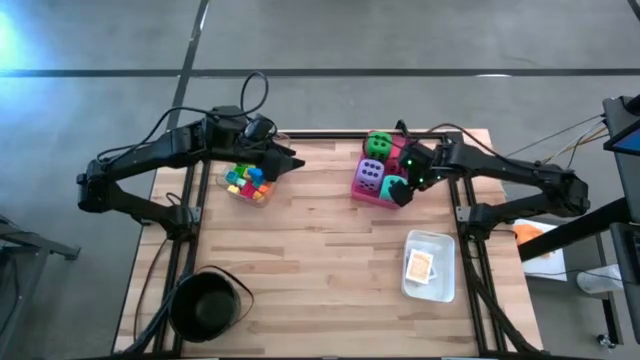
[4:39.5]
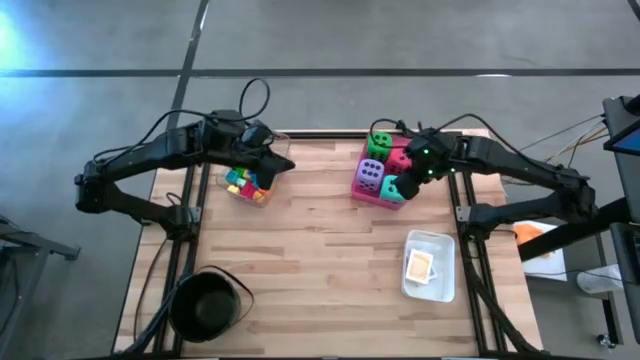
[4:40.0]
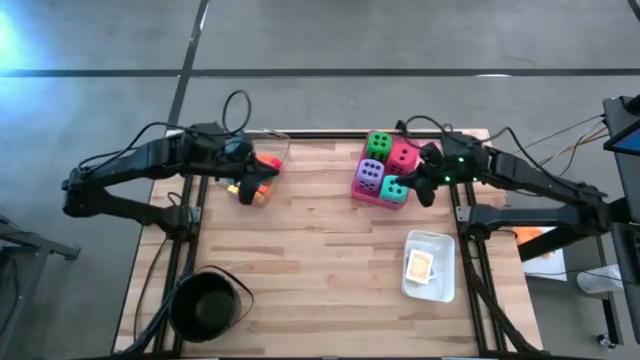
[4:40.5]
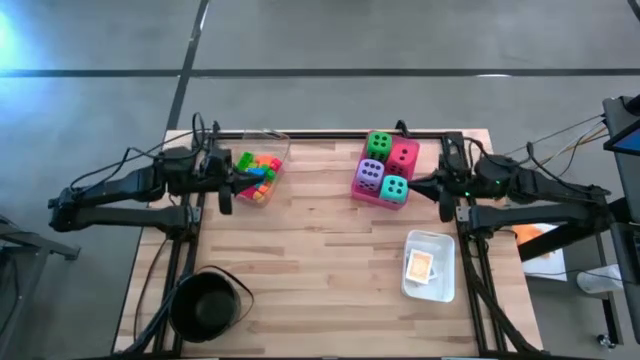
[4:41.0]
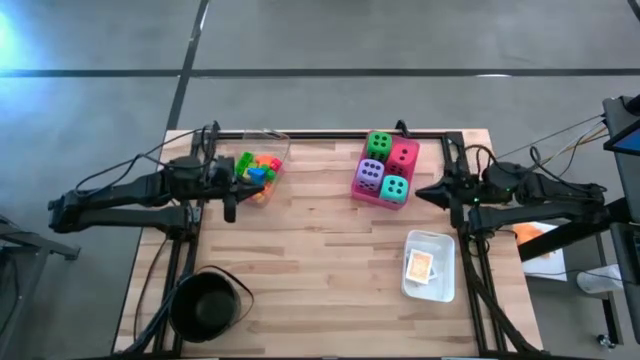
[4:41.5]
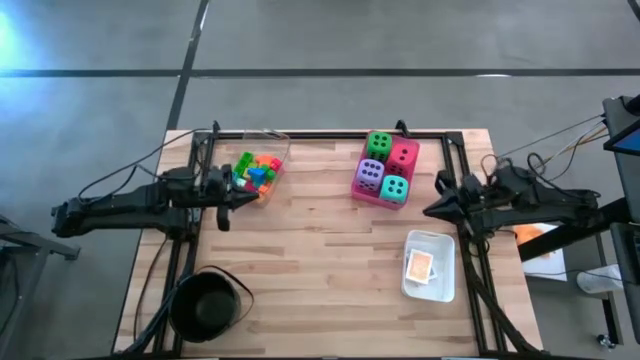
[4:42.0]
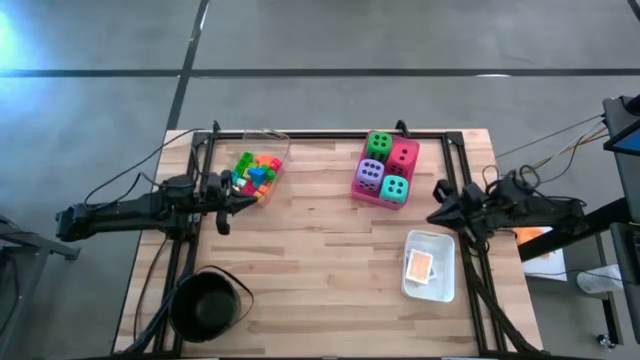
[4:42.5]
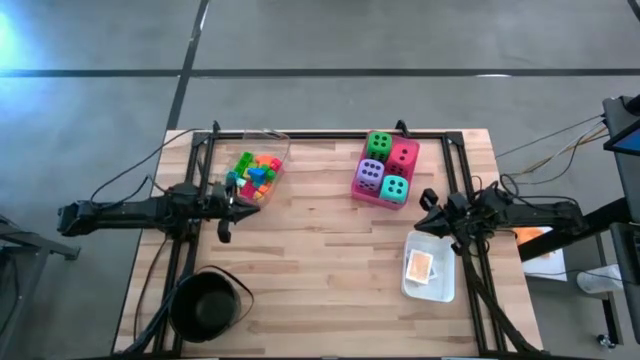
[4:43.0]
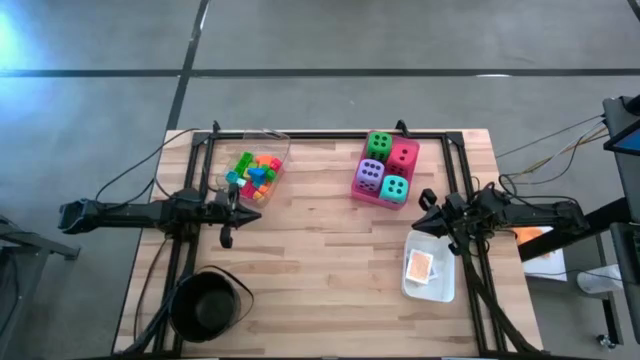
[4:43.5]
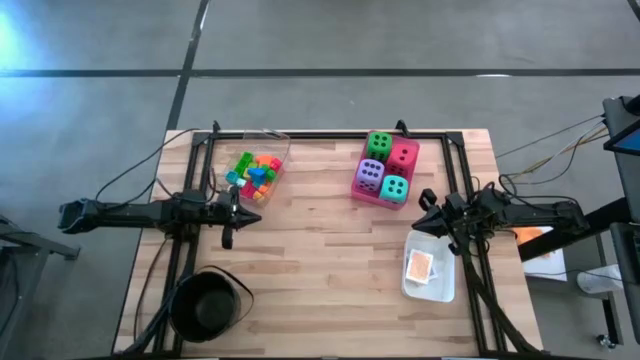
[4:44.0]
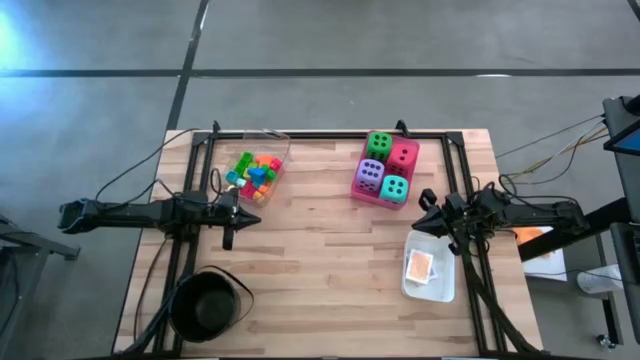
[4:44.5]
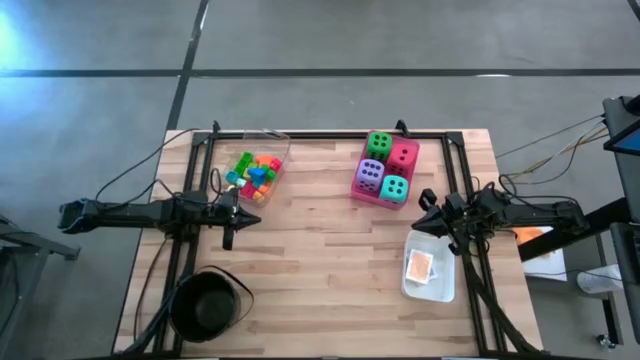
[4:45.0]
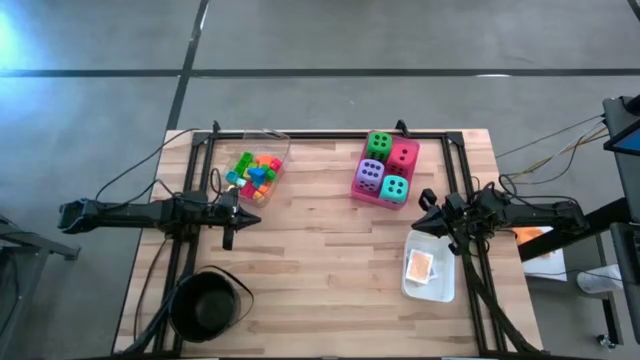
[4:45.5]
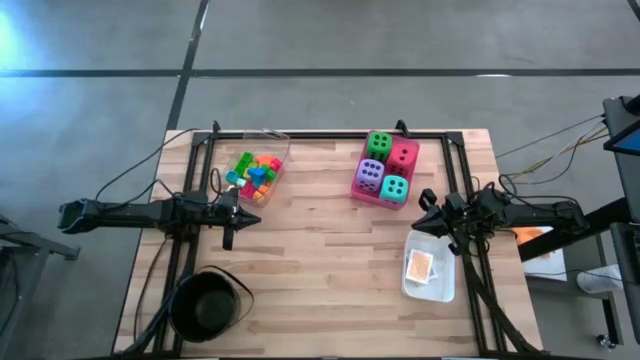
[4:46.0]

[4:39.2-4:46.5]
Task: Pick & Place Toys
Return to Home Position

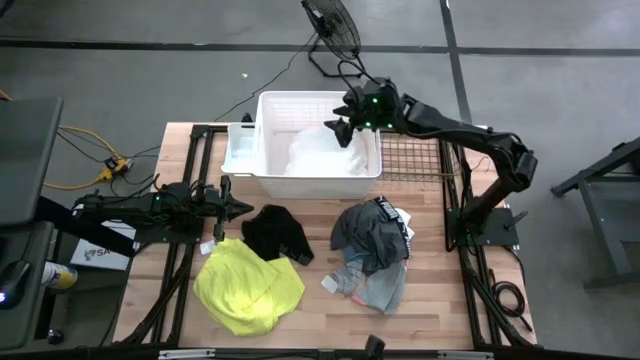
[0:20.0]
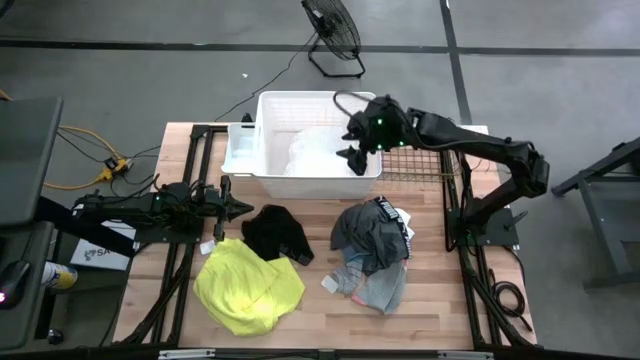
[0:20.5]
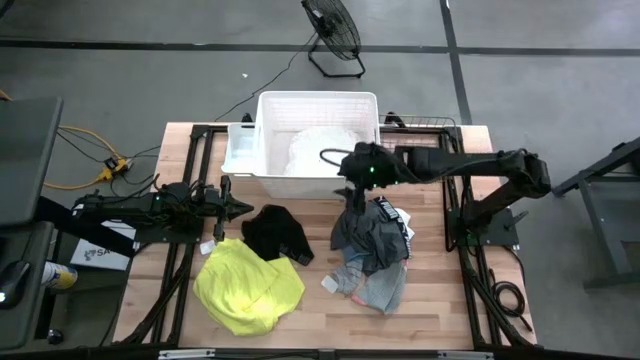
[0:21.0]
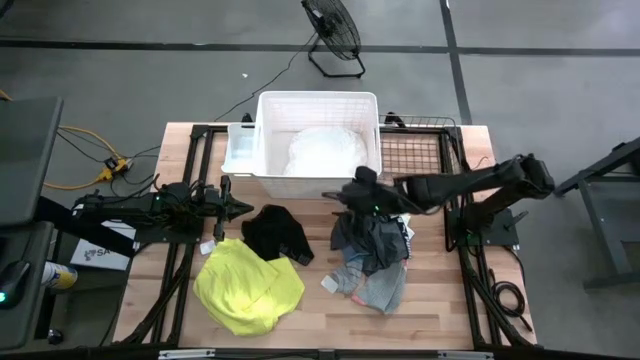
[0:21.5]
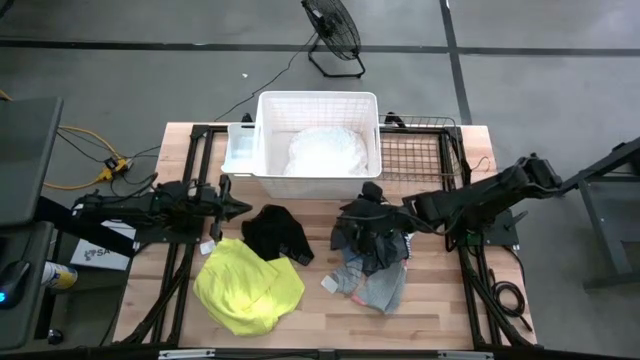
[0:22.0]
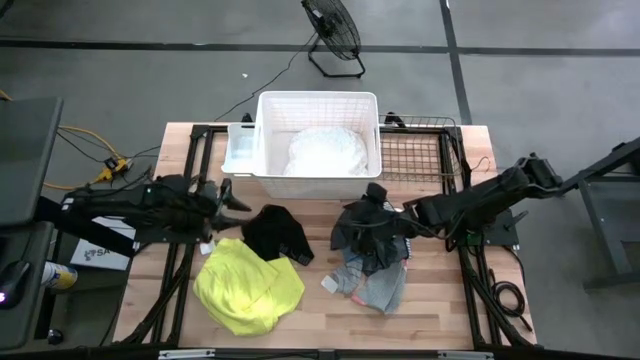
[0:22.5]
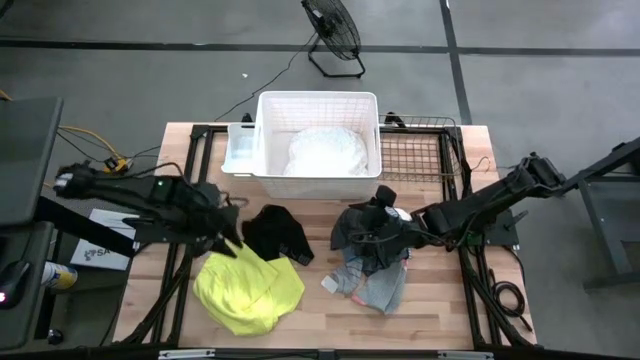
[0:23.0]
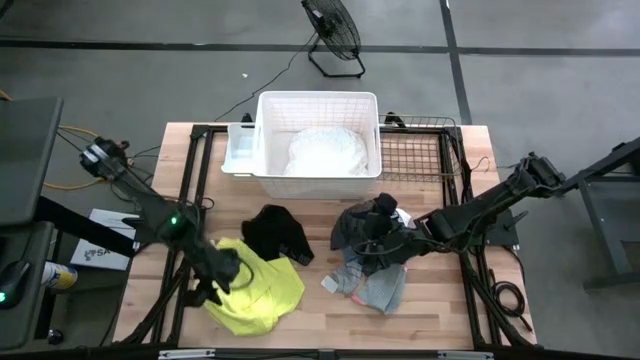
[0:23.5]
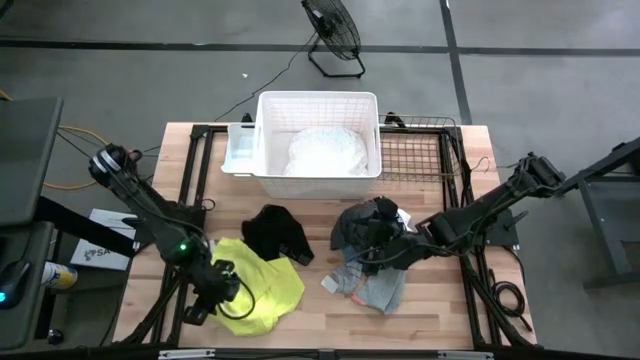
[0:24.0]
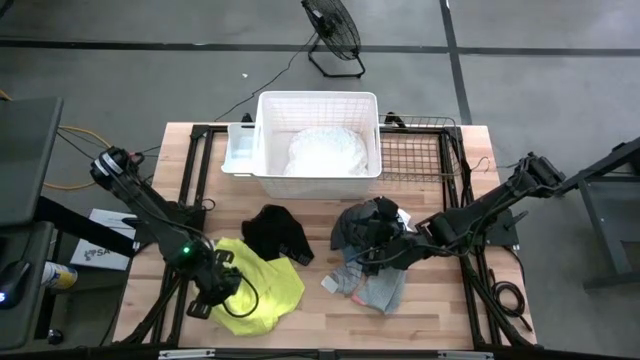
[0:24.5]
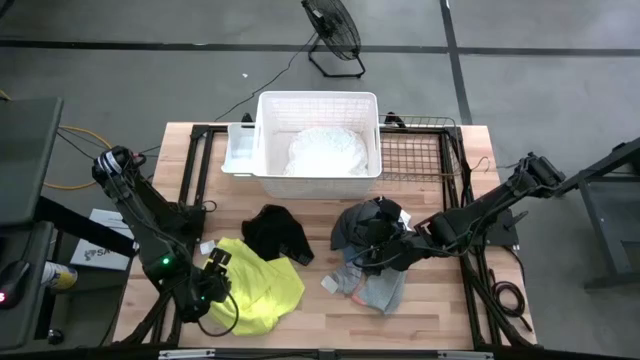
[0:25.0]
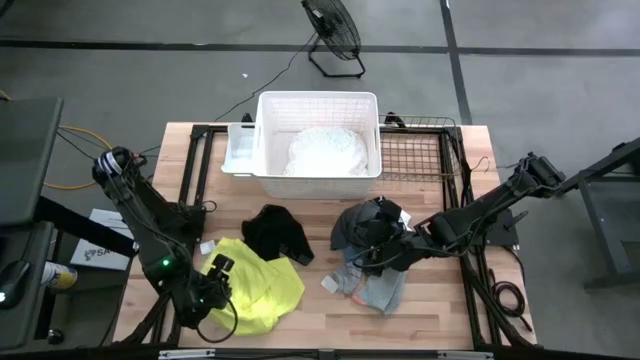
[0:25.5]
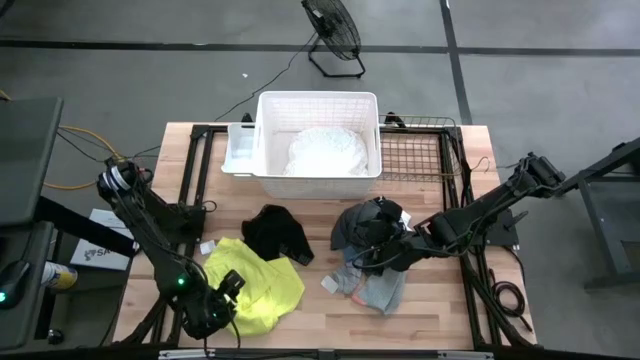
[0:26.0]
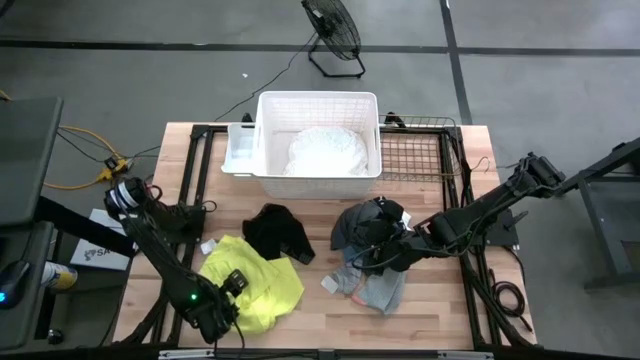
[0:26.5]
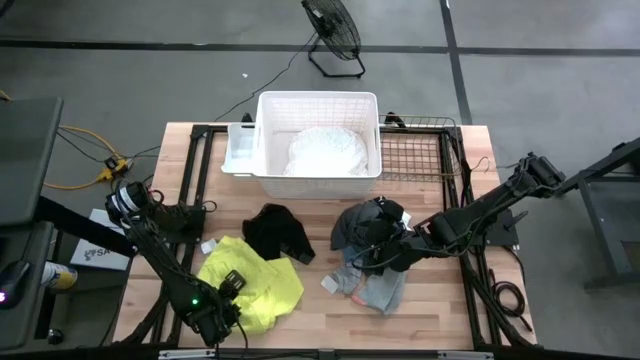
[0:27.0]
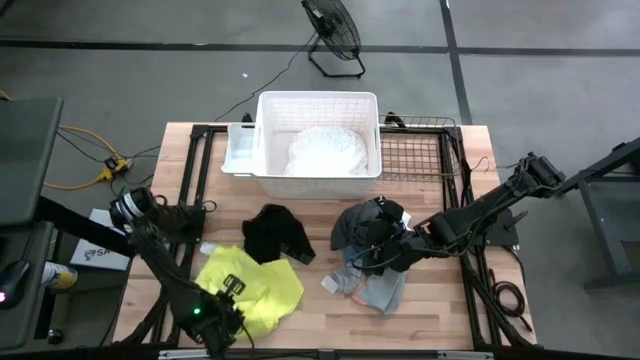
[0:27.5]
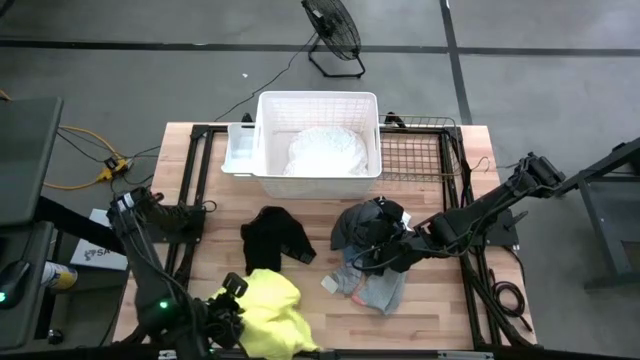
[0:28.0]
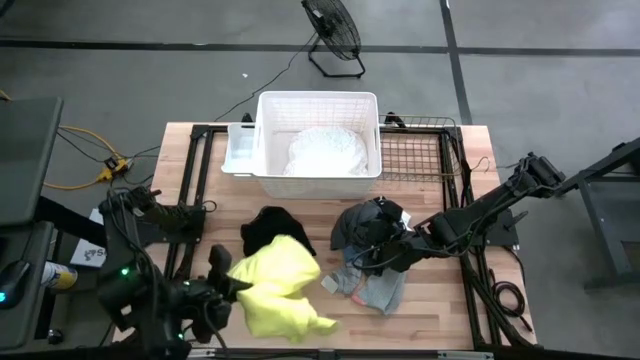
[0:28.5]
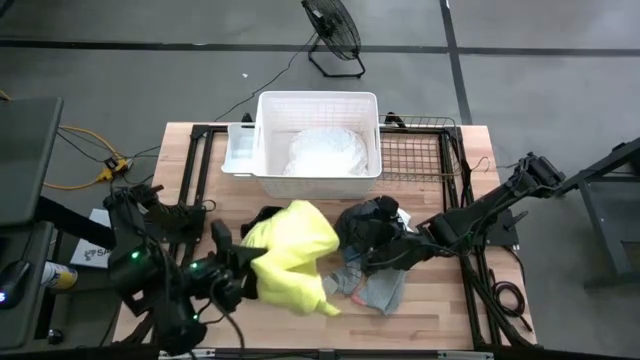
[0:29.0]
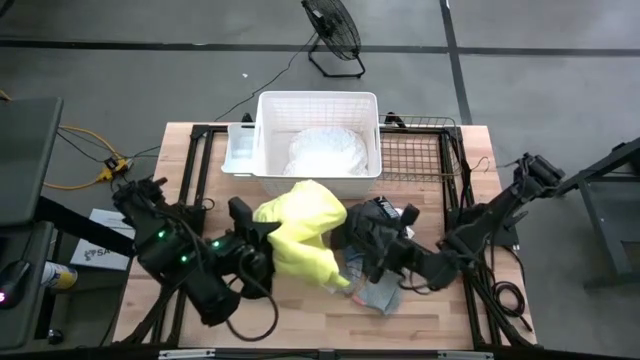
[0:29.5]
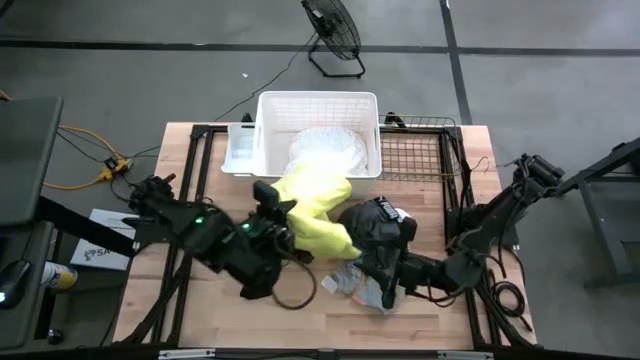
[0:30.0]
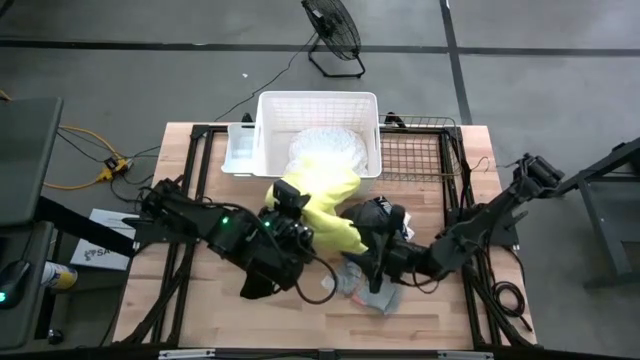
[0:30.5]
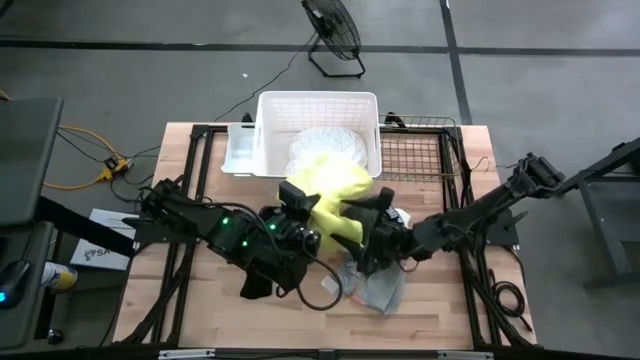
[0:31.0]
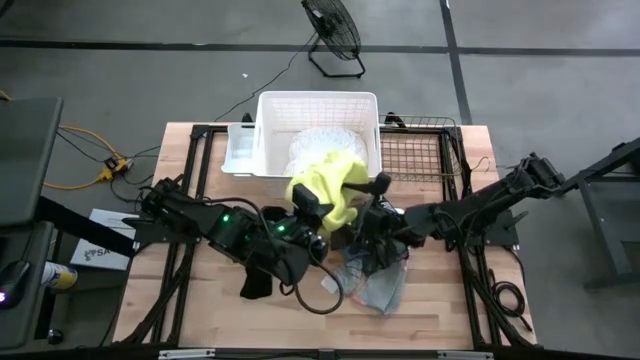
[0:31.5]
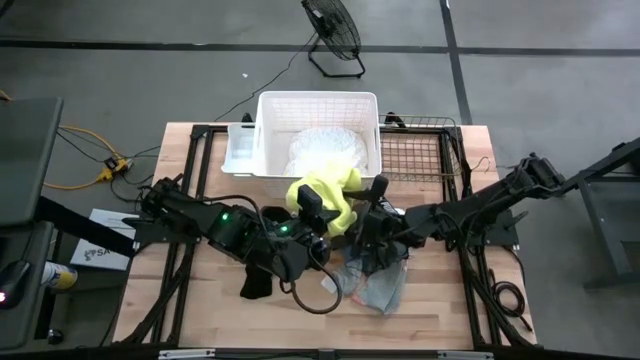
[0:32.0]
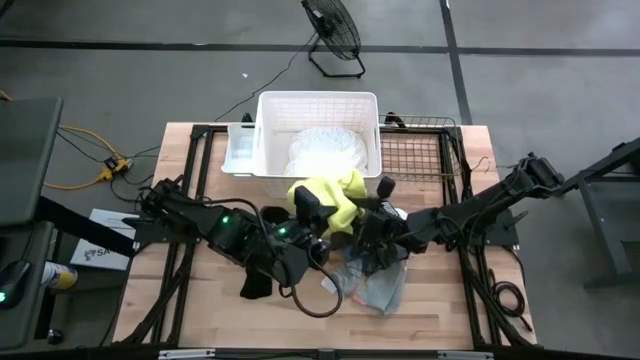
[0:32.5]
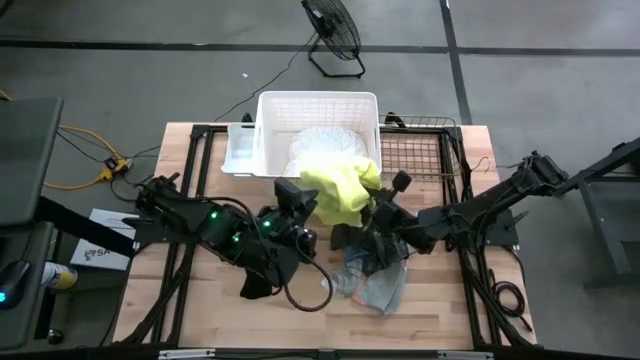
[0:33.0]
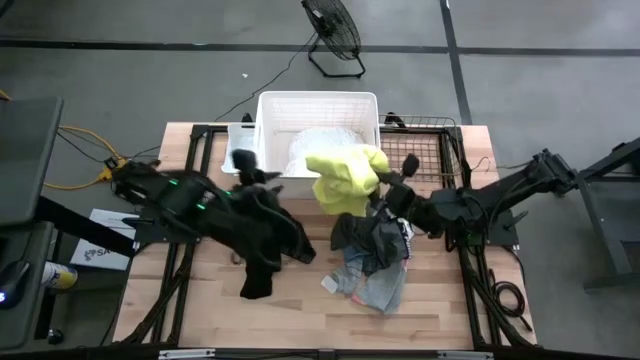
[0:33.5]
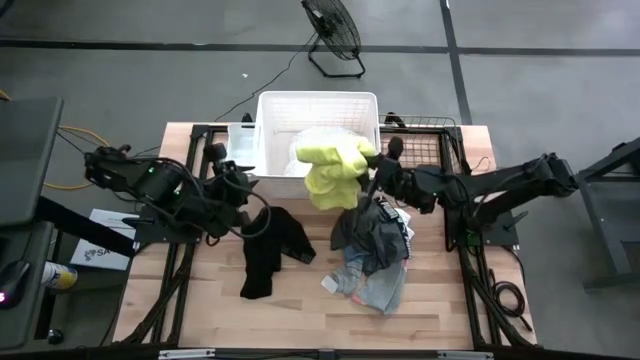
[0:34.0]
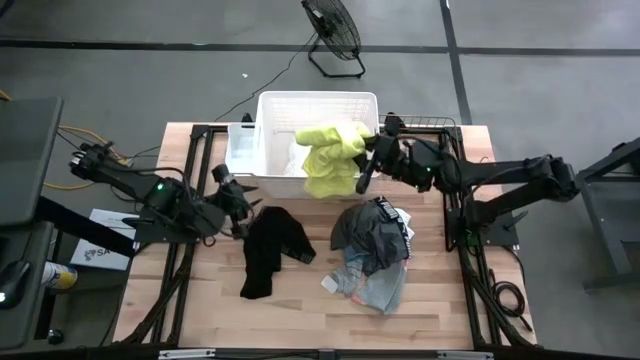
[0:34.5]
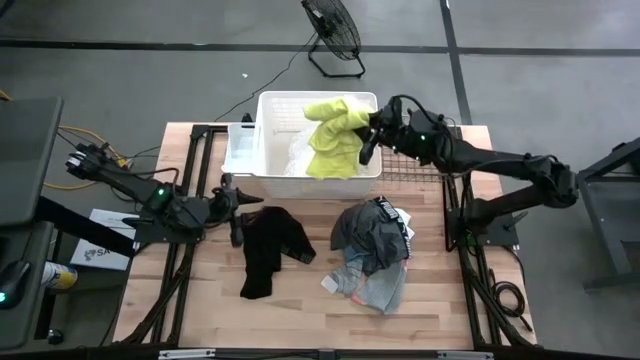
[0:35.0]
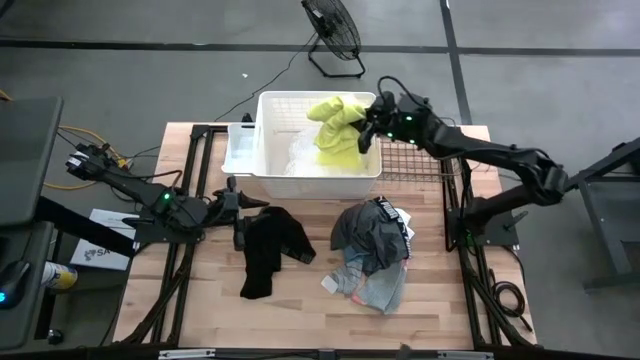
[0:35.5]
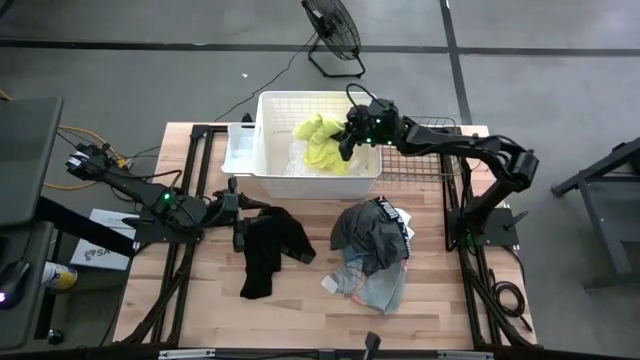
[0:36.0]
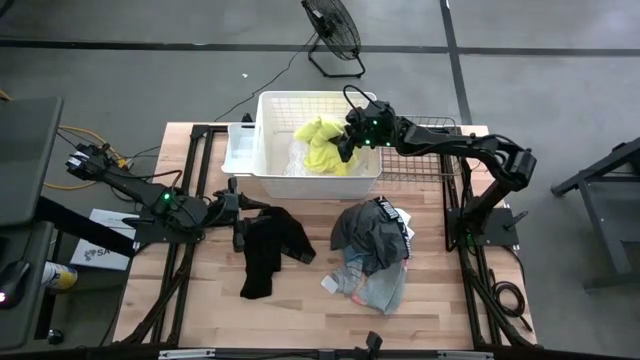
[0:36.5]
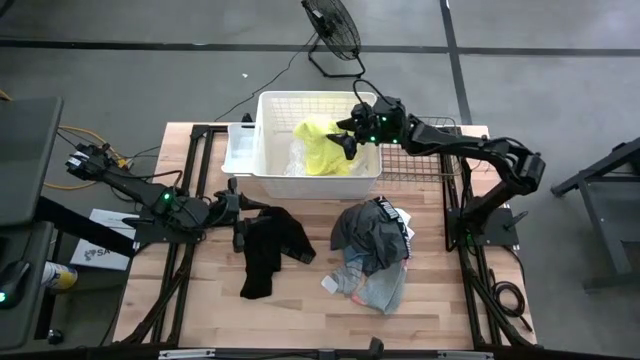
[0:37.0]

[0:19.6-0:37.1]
Task: Pick & Place Cloths
Put the yellow shirt into the laundry organizer
